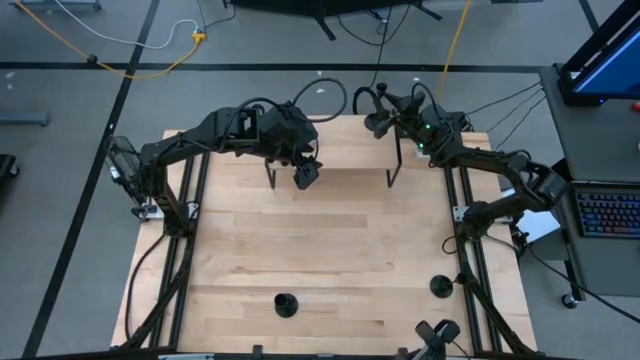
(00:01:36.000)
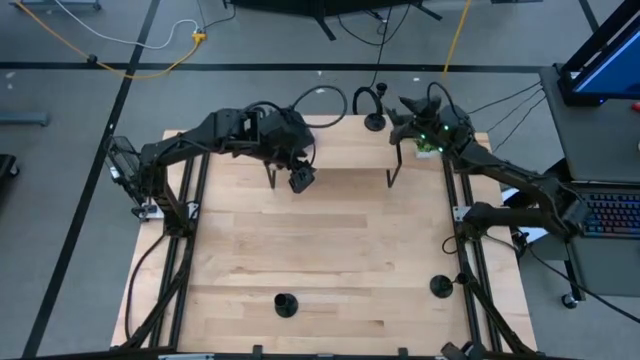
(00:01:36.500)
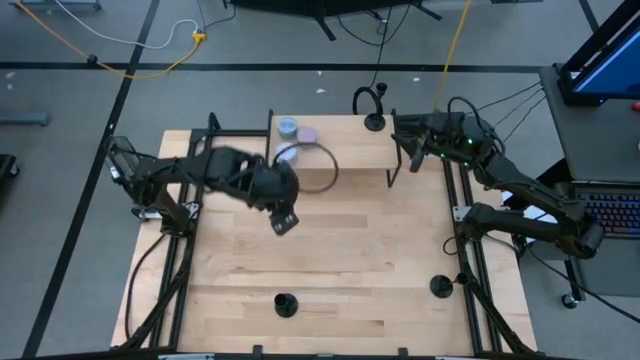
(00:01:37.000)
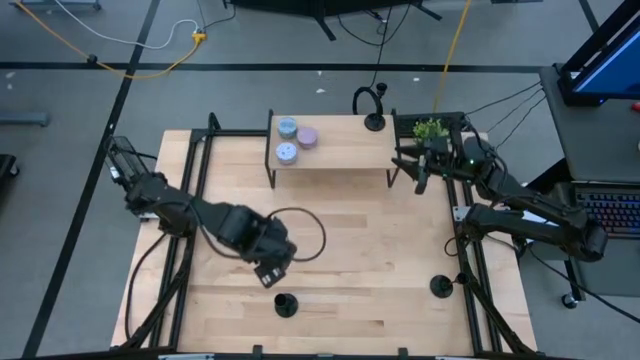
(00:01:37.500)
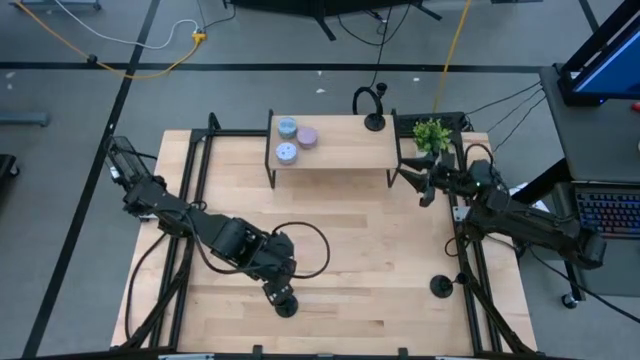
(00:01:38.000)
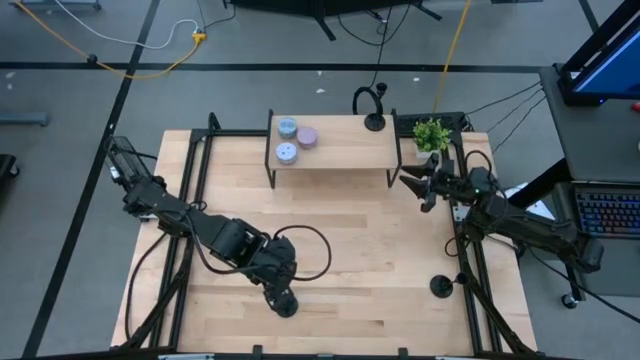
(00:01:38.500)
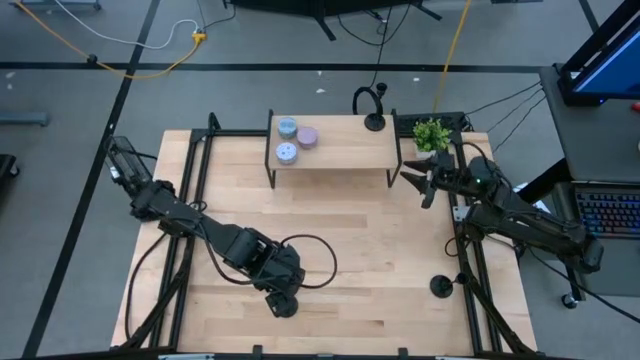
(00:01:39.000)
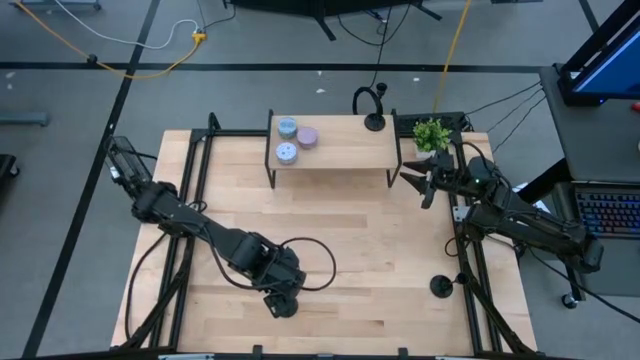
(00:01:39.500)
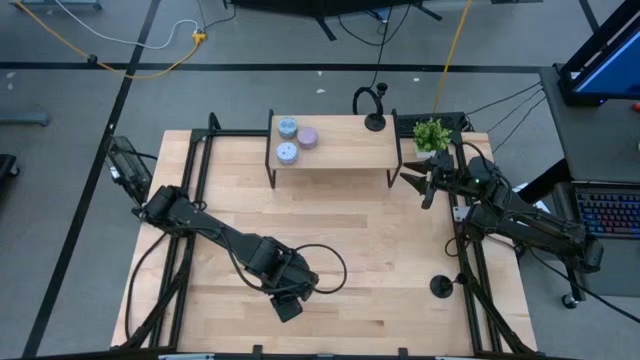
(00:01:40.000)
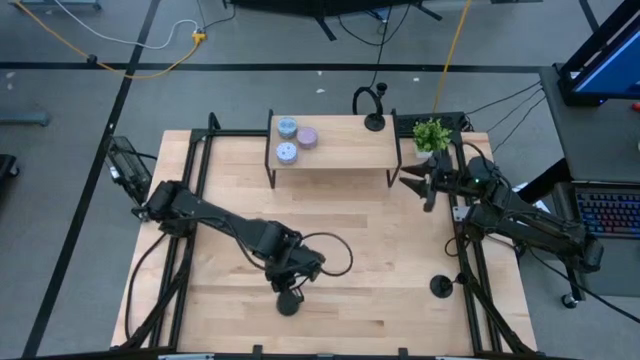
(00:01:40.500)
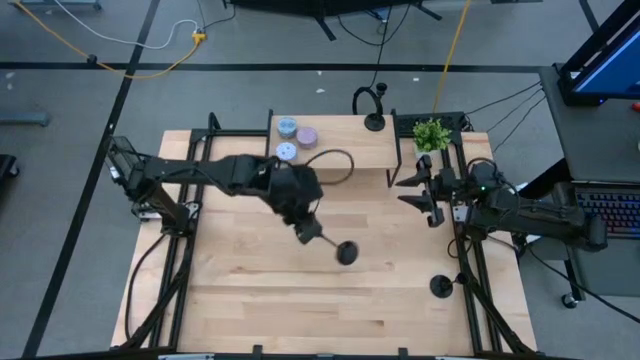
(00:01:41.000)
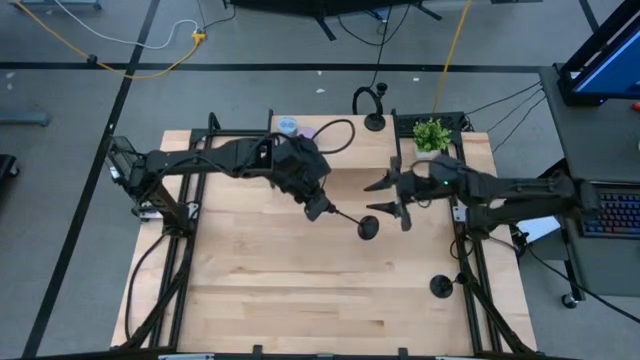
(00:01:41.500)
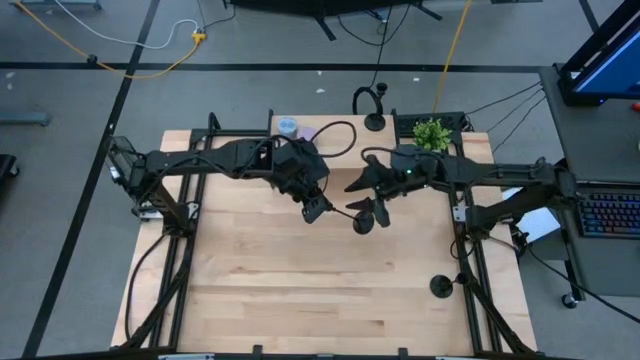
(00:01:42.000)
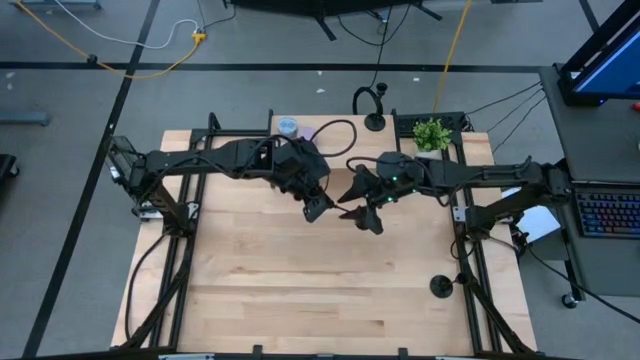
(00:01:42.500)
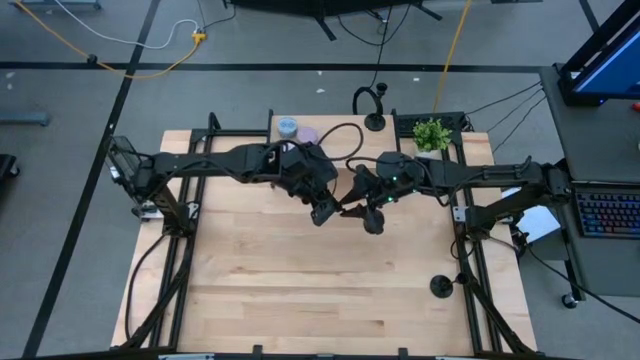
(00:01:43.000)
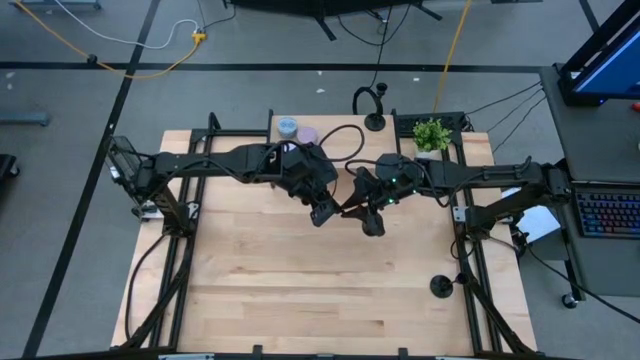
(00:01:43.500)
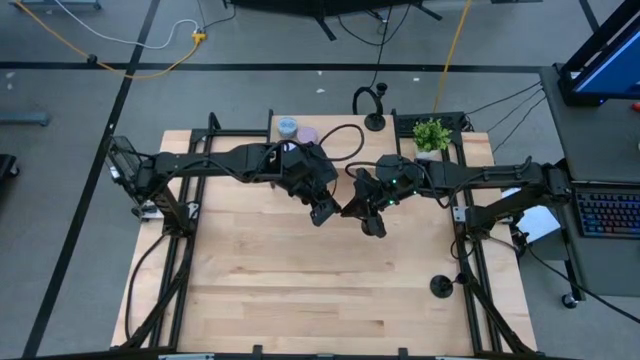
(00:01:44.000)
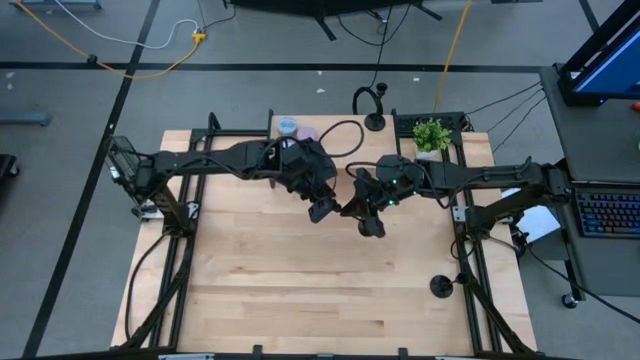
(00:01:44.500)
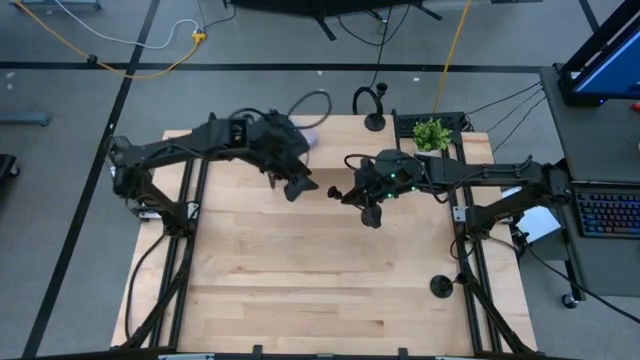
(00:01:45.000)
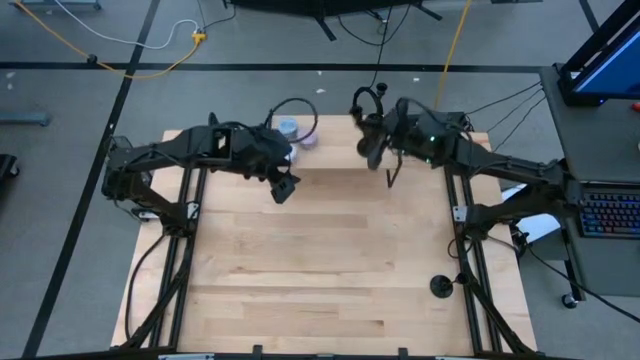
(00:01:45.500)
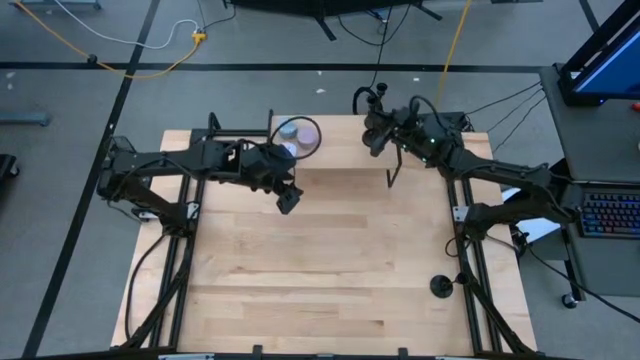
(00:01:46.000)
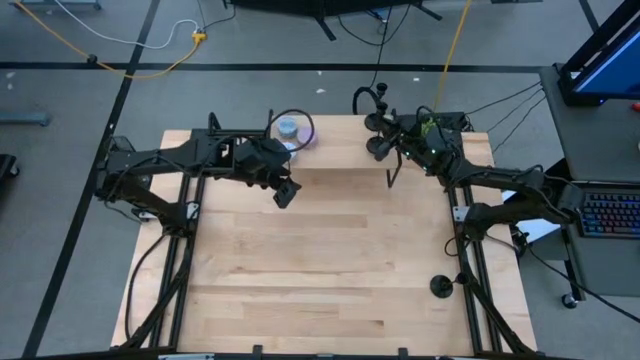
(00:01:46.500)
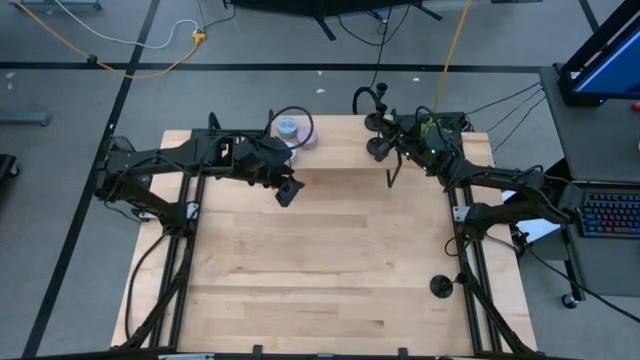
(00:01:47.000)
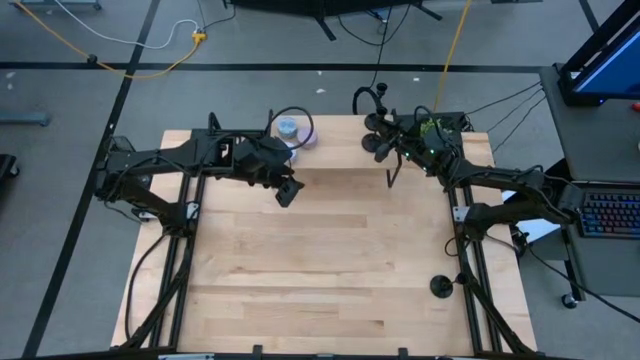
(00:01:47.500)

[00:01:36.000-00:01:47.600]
Task: Pick & Place candle stick holders
Put the left black candlestick holder on the shelf

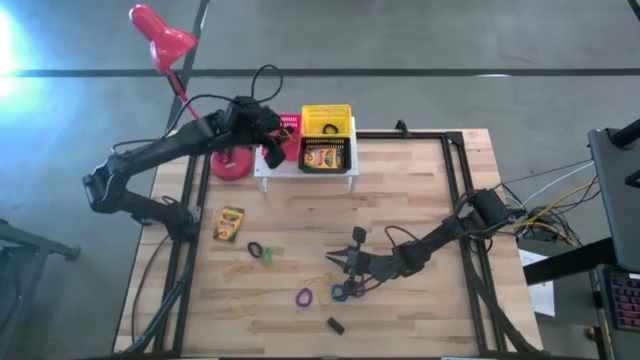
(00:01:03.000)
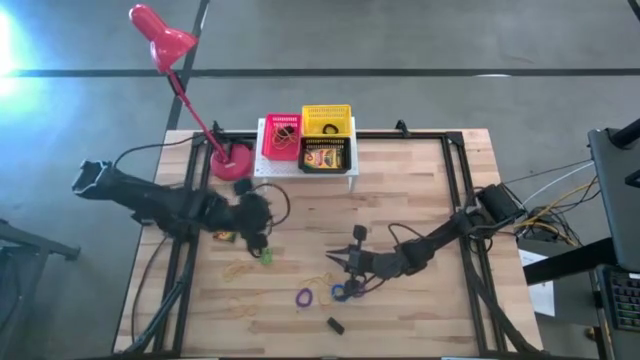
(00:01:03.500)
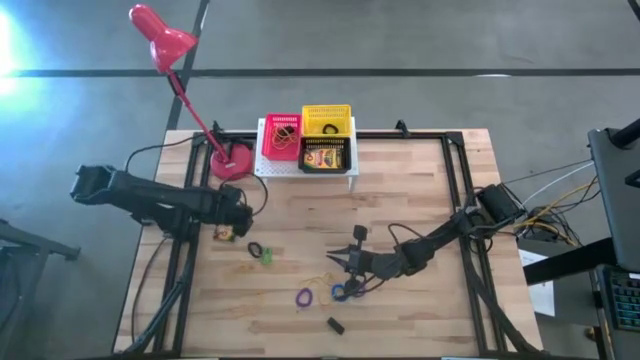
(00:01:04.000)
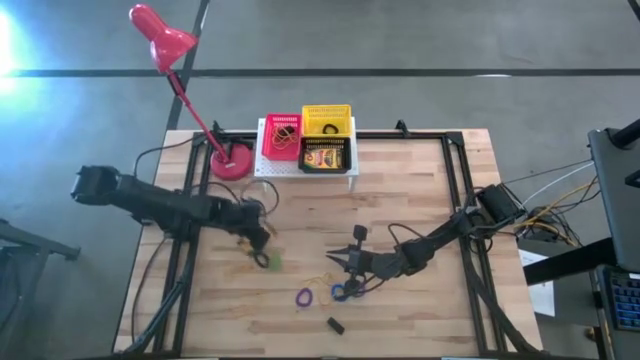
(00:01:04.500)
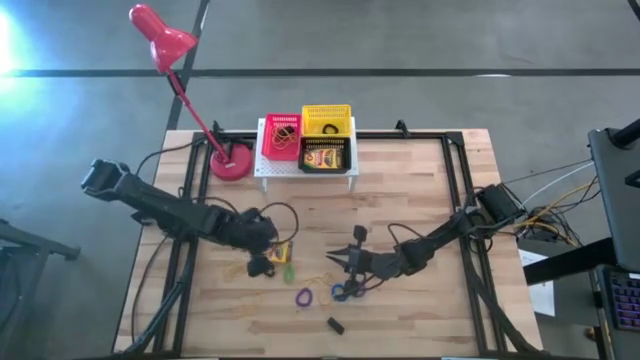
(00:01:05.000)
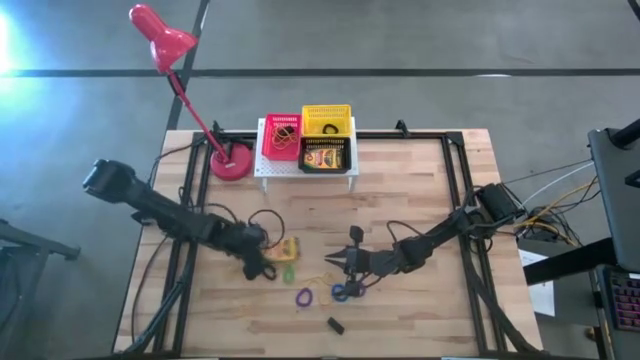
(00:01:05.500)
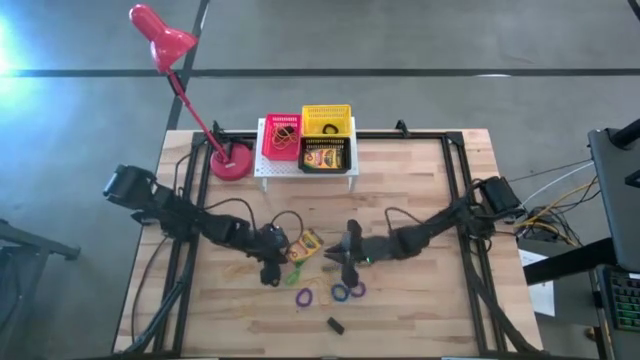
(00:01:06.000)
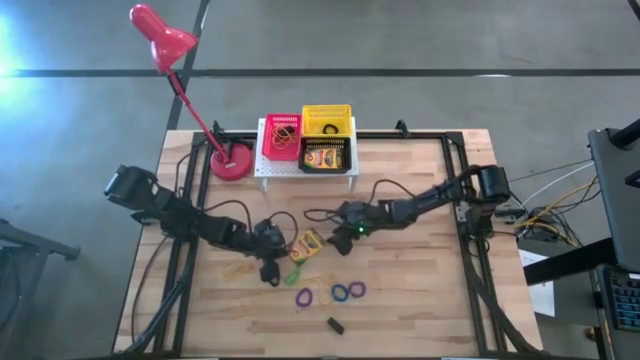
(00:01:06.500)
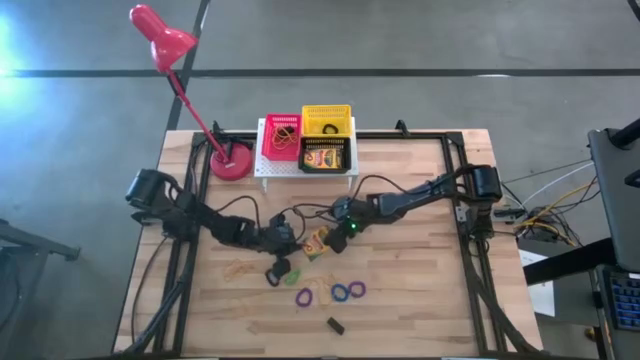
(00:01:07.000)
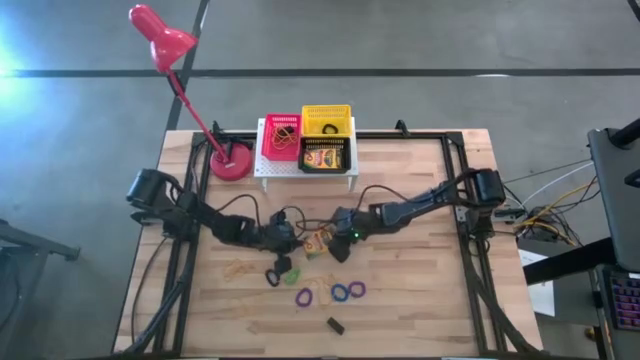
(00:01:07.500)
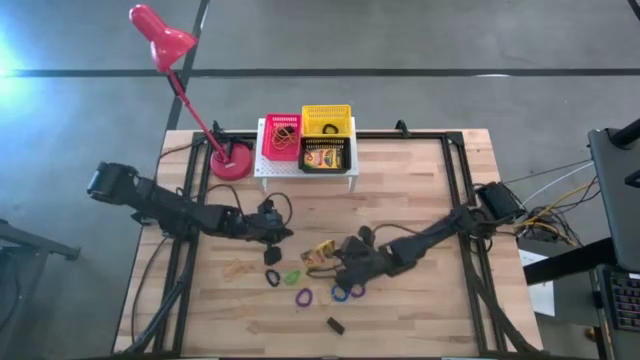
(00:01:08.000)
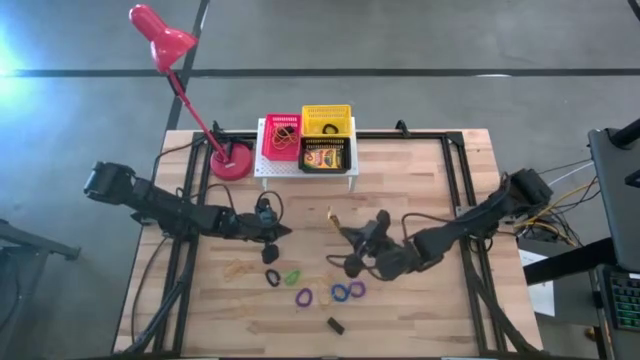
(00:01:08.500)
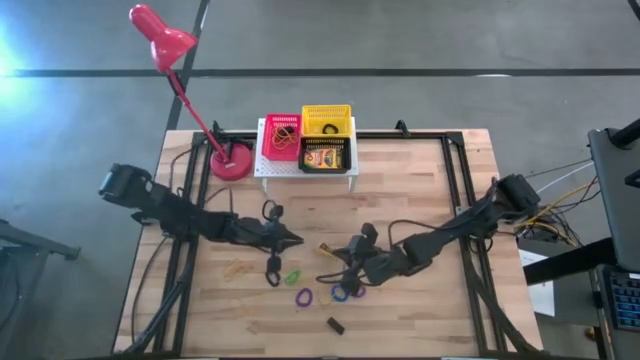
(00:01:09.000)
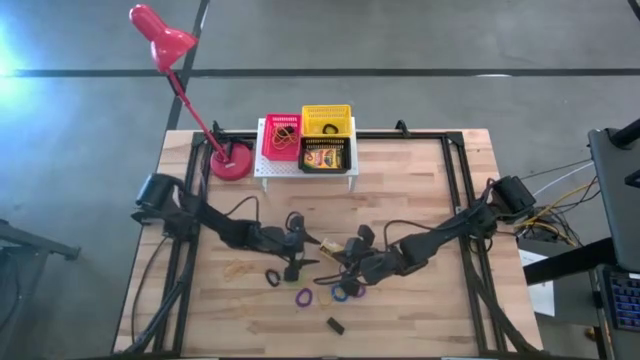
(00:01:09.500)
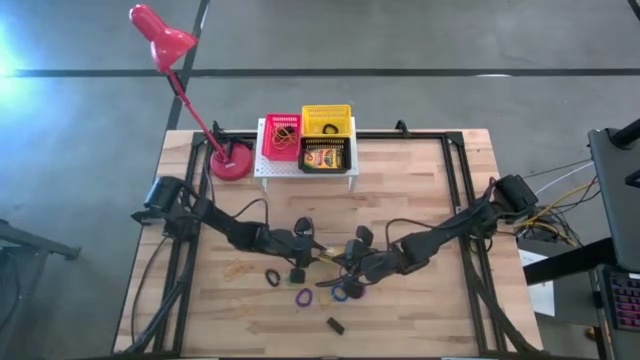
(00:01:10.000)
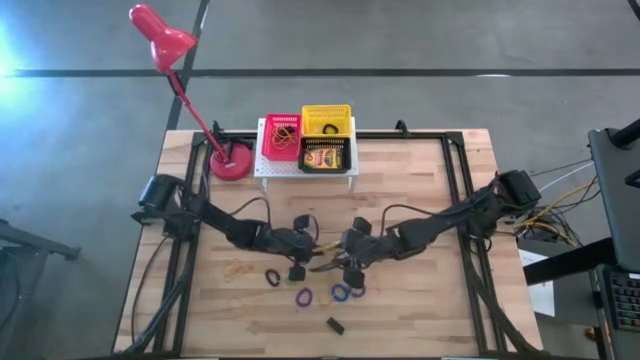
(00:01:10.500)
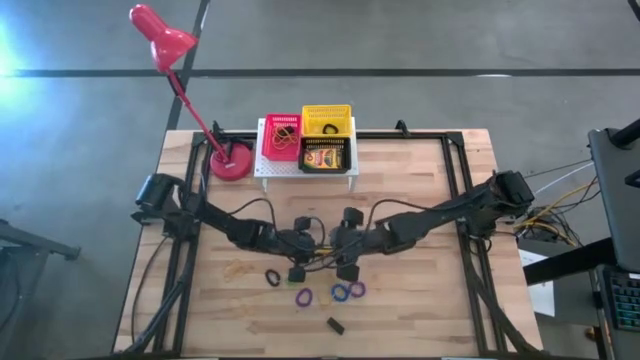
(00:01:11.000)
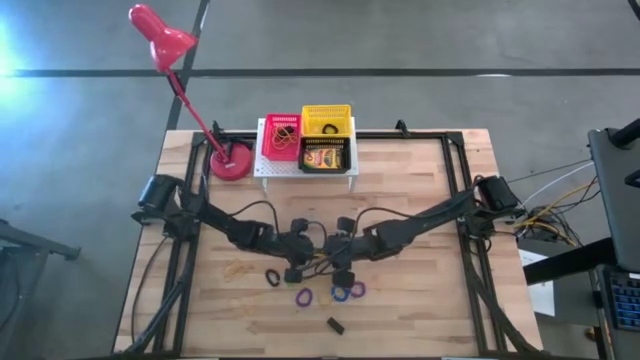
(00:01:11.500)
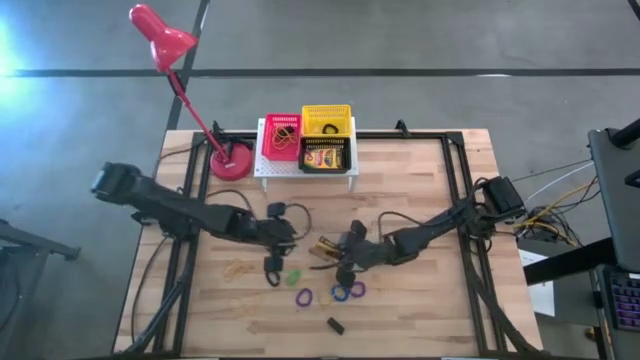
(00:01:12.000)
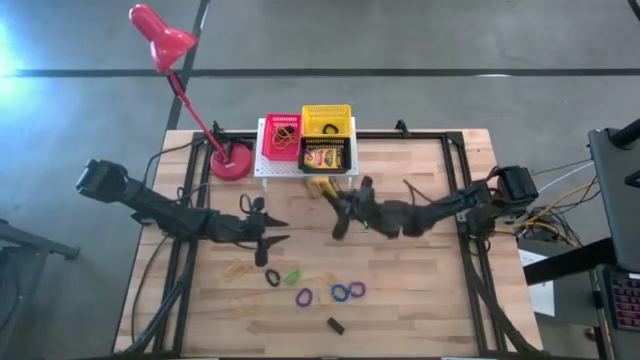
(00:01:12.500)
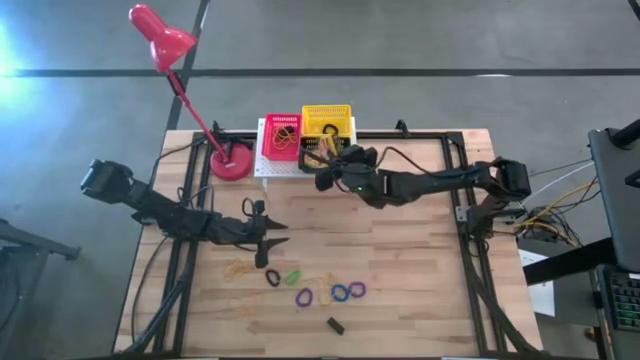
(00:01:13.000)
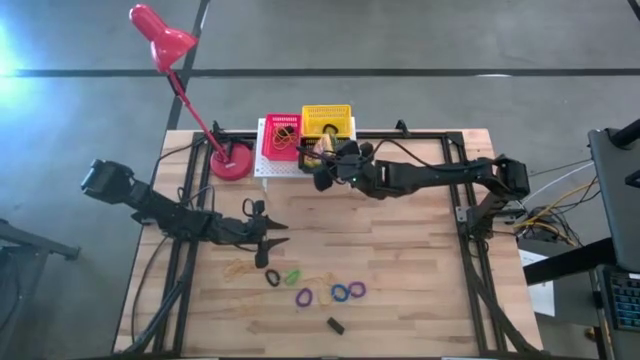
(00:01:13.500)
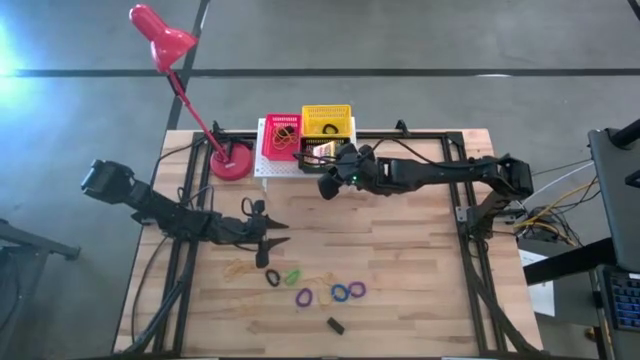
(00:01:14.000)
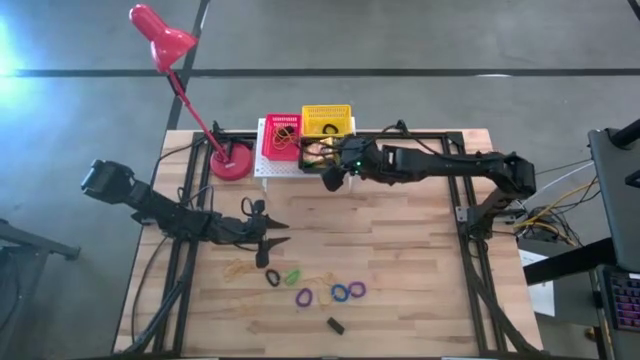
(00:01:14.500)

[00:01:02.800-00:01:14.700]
Task: Pick & Place Office Desk Supplies
Put the crayon box into the black bin on the shelf
